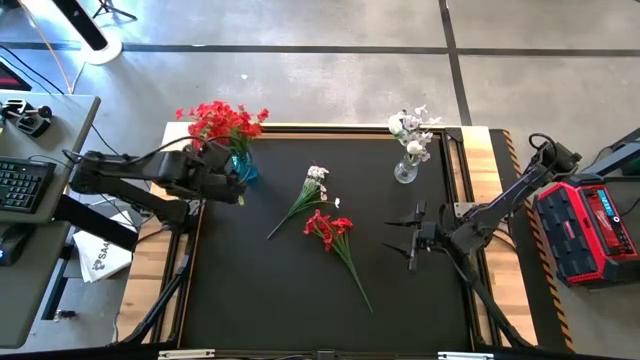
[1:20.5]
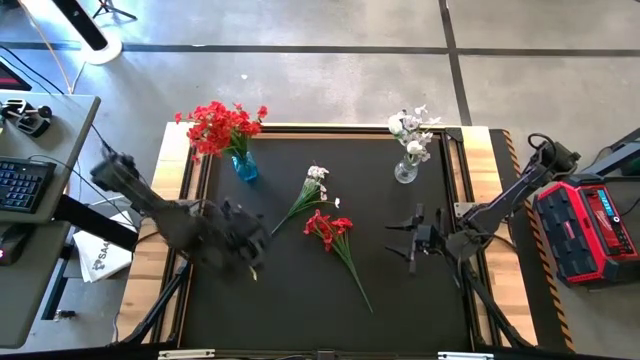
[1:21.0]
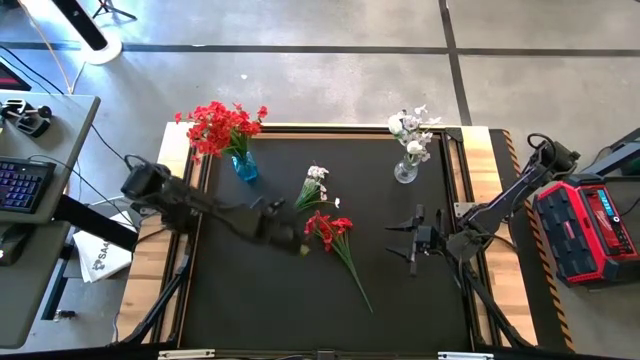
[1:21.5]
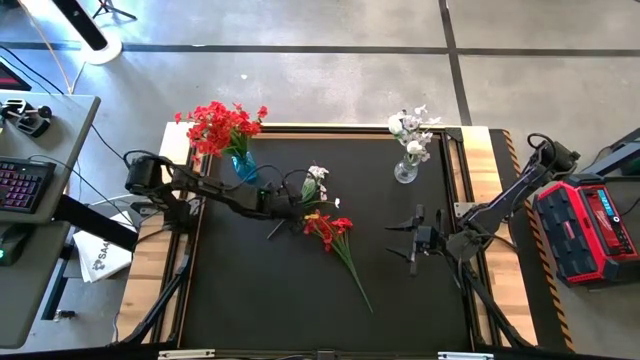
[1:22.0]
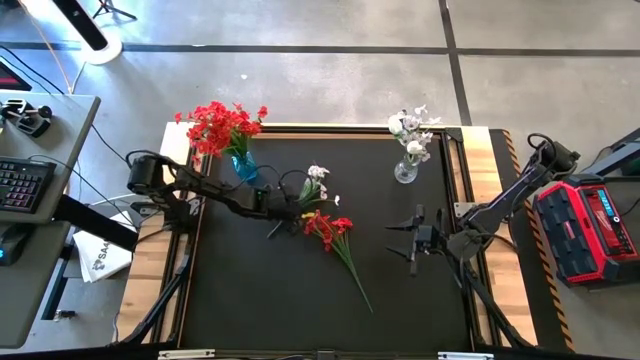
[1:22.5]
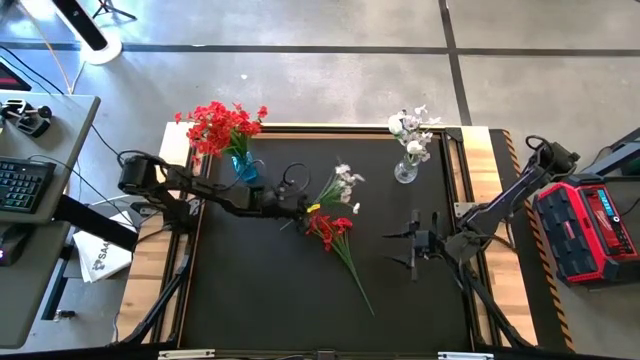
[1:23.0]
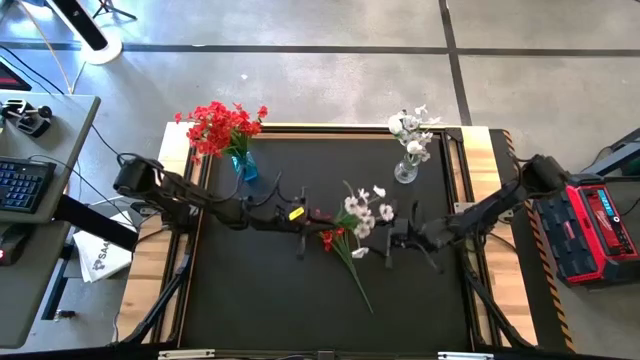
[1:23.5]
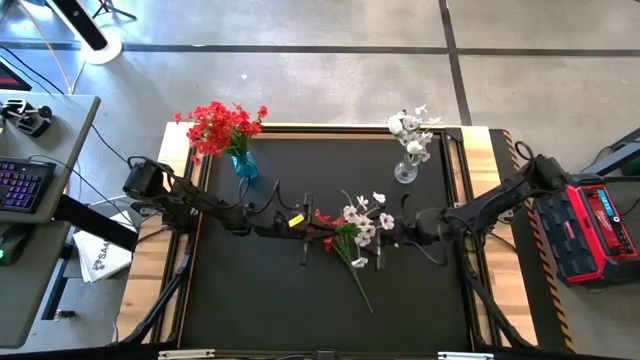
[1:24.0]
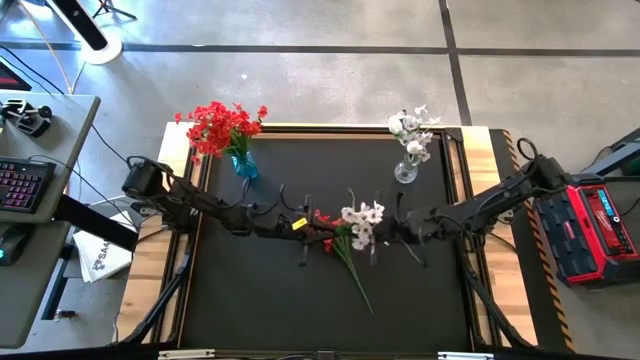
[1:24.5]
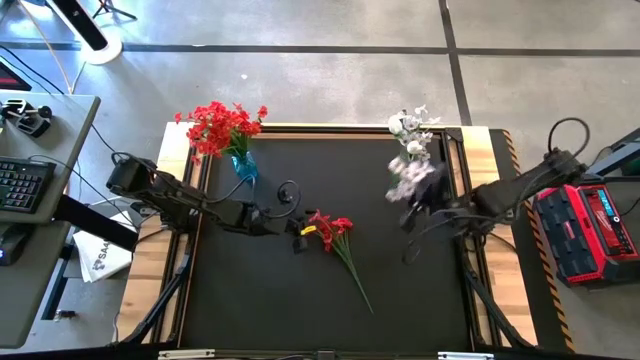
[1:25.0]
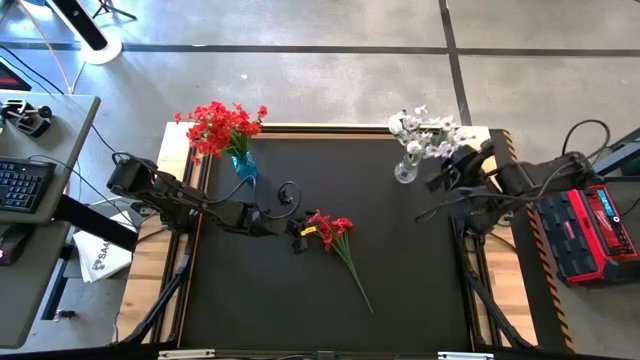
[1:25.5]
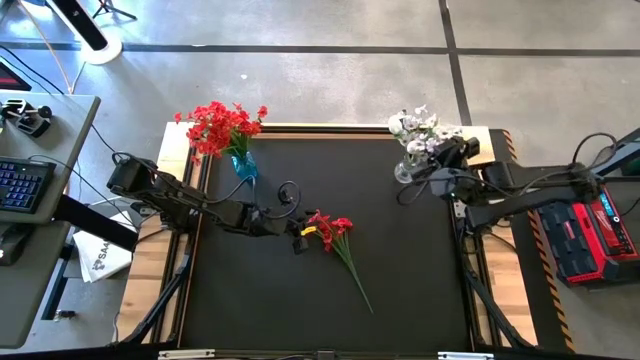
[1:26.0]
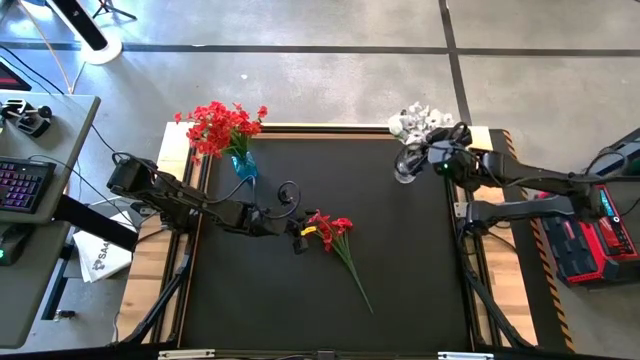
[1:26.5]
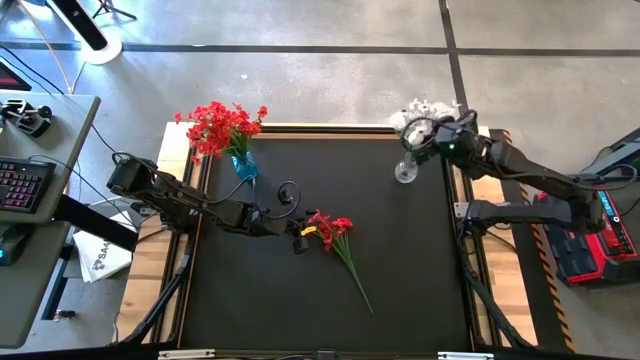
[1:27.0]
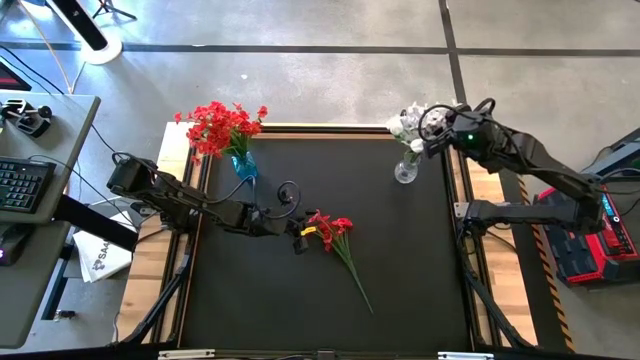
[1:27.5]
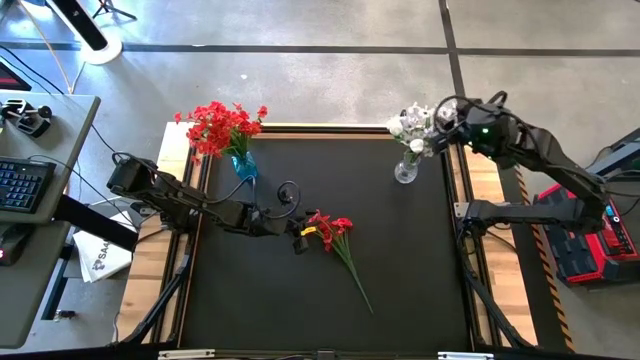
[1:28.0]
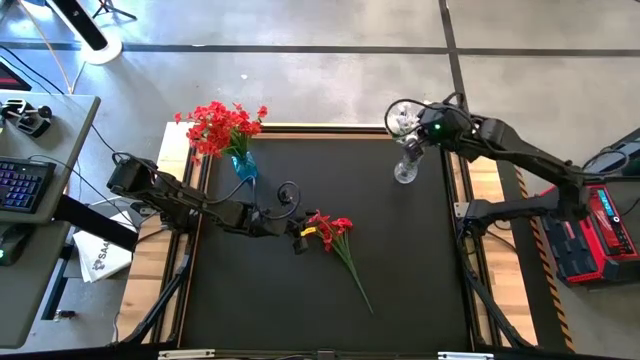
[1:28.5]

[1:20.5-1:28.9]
Task: Sort flowers into vase by color
Put the white flowers into the transparent vase

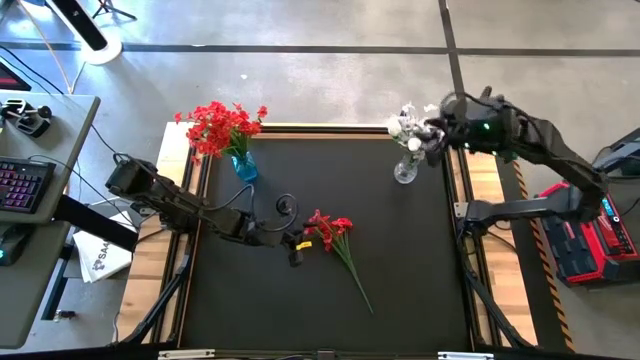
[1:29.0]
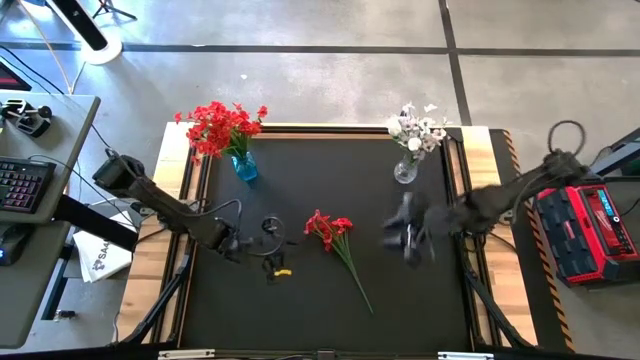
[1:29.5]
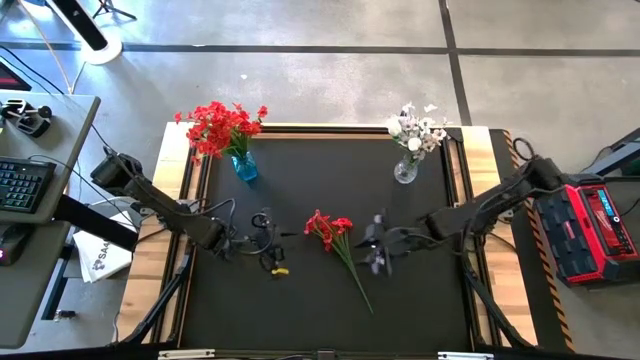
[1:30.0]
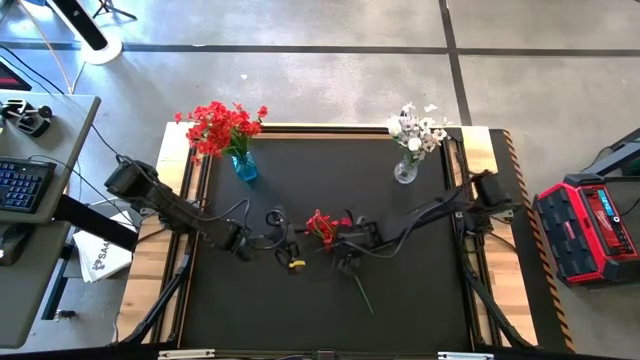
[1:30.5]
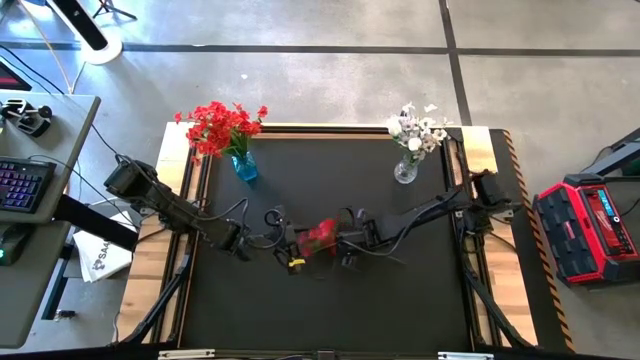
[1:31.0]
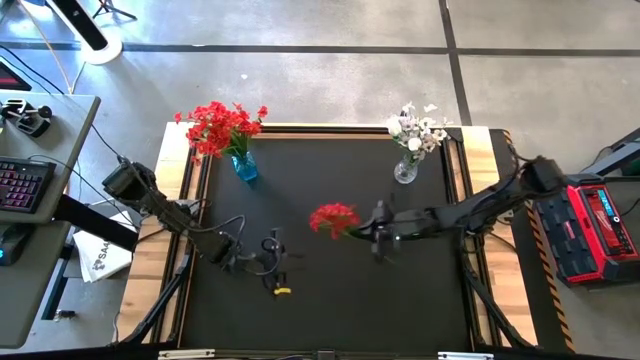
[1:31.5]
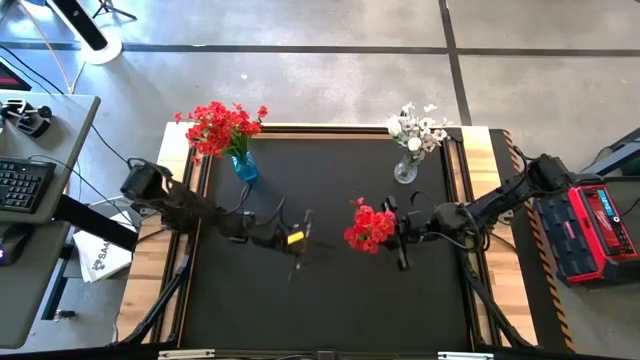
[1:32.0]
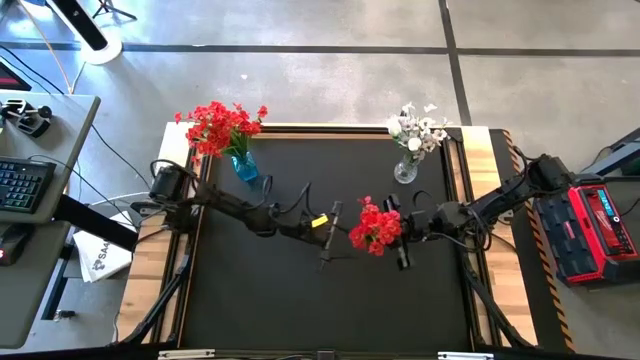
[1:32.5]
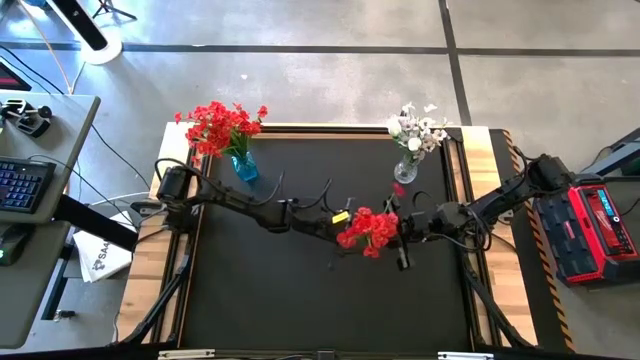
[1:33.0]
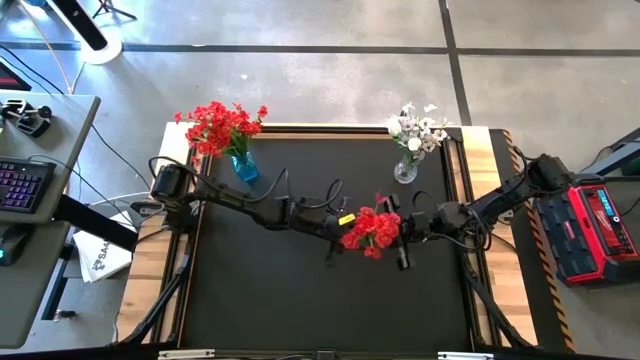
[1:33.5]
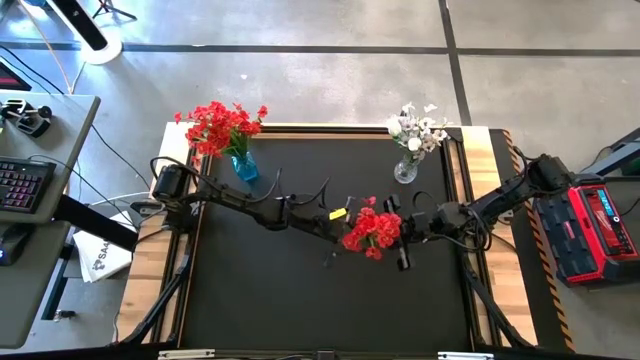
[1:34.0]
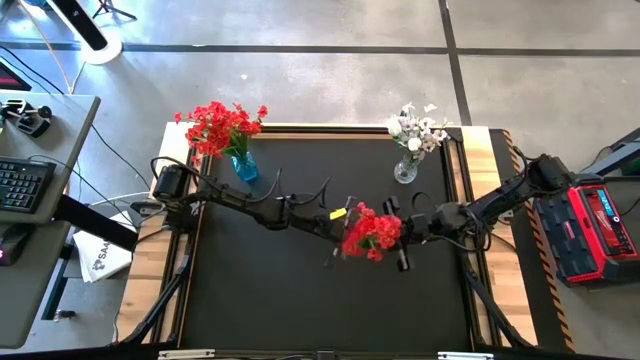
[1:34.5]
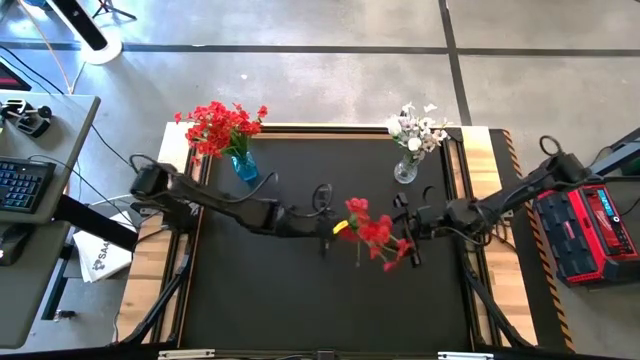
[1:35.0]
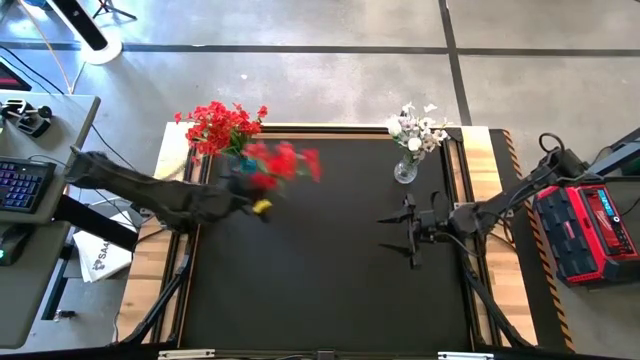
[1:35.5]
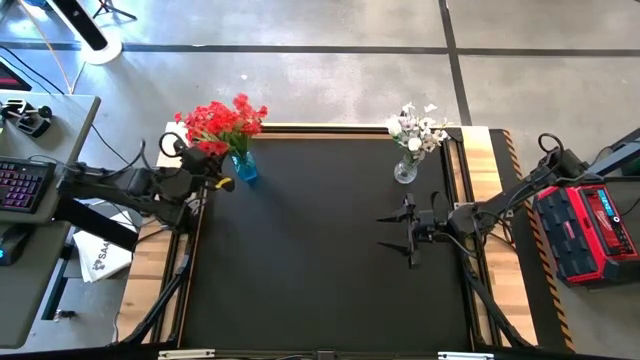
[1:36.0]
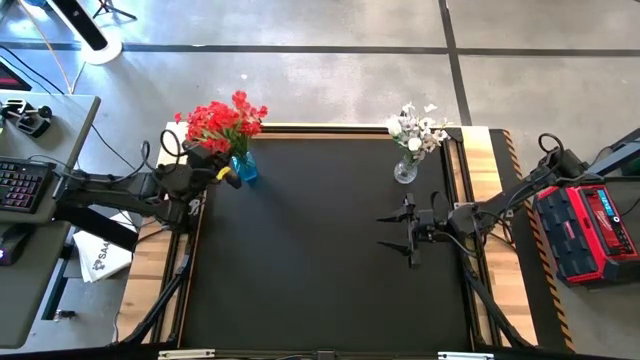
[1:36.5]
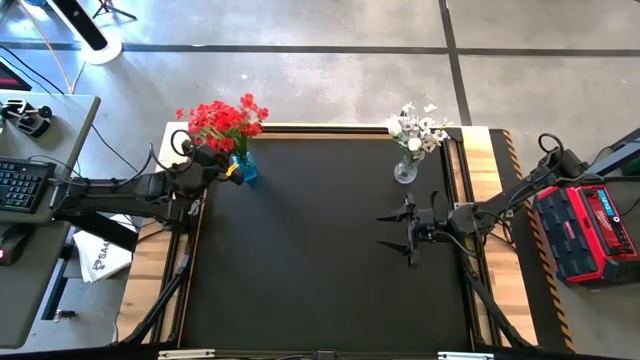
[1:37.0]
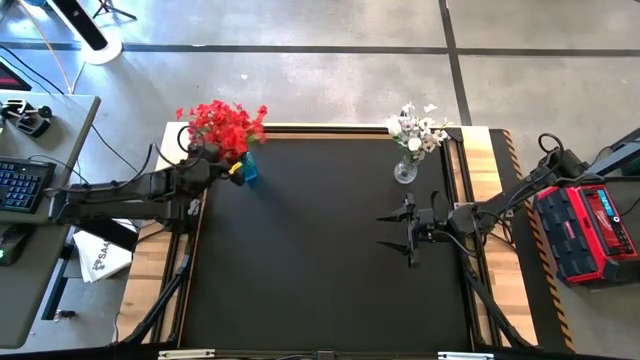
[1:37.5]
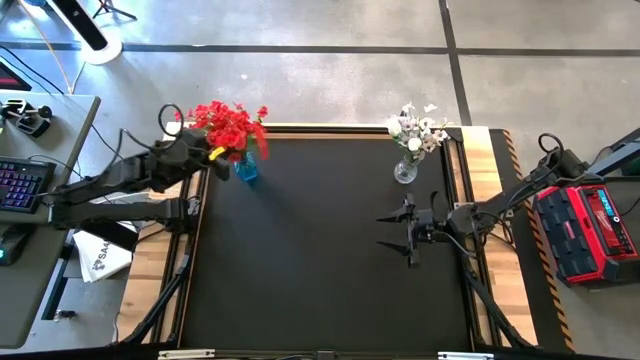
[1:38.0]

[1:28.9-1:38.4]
Put the red flowers into the blue vase

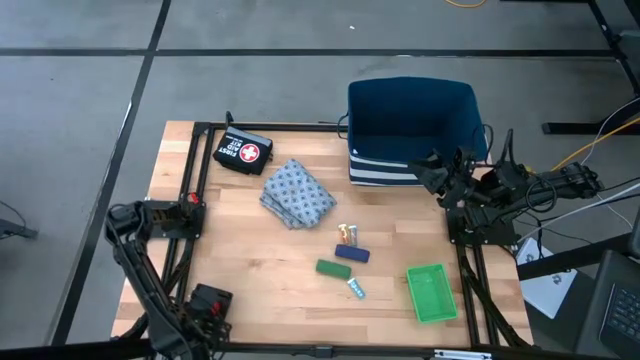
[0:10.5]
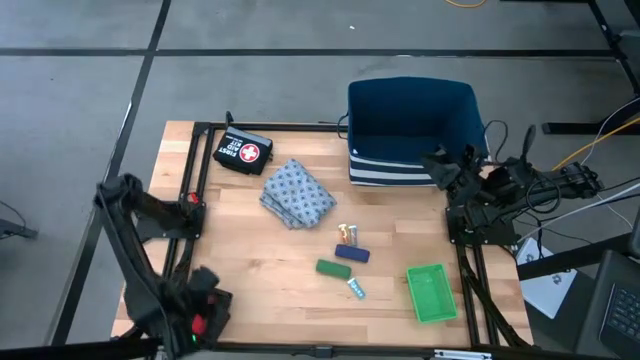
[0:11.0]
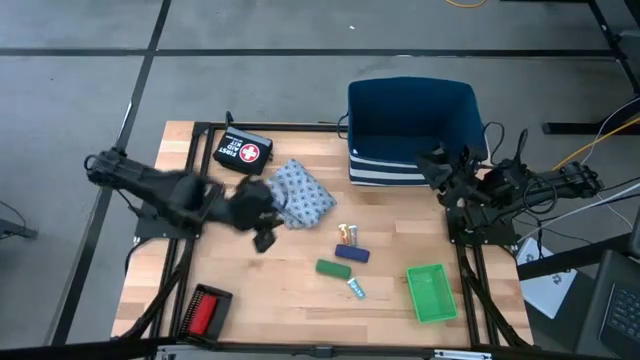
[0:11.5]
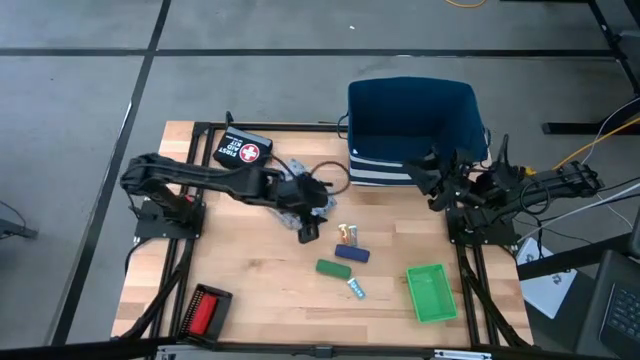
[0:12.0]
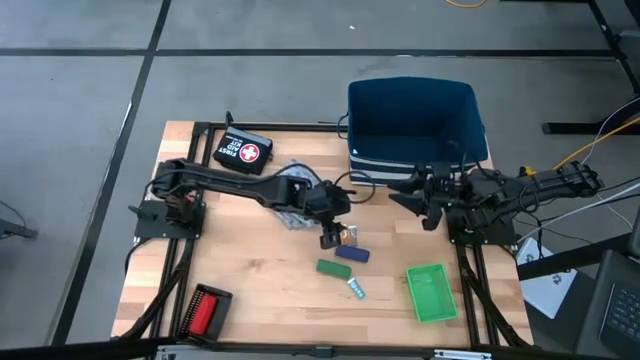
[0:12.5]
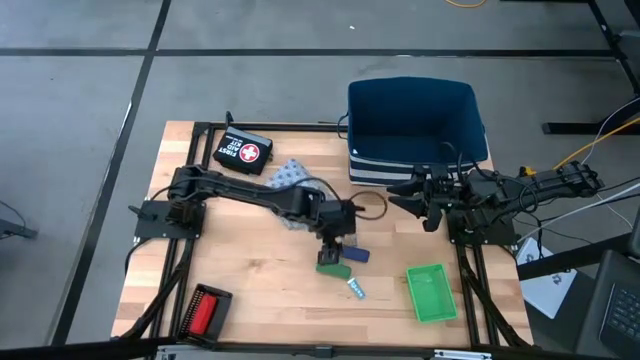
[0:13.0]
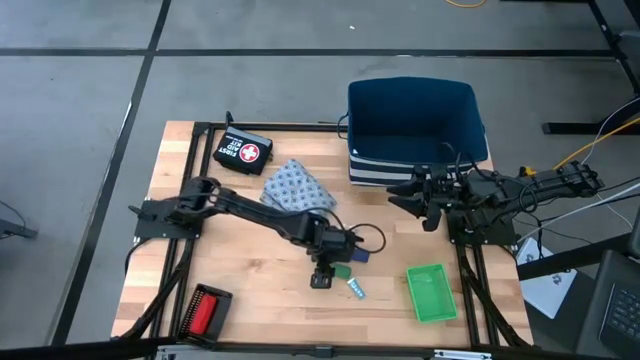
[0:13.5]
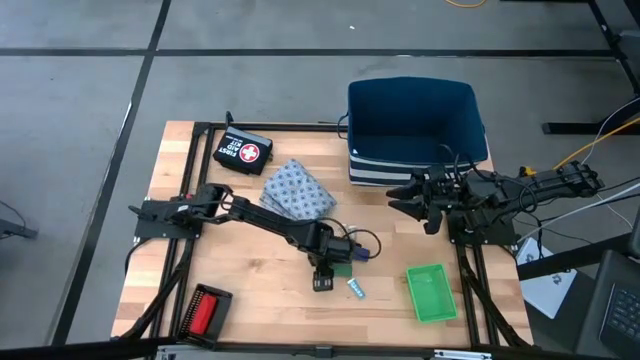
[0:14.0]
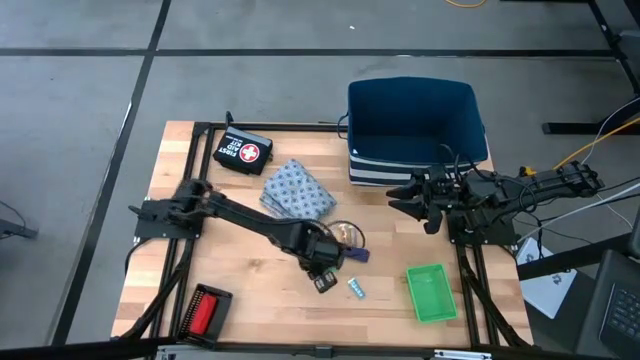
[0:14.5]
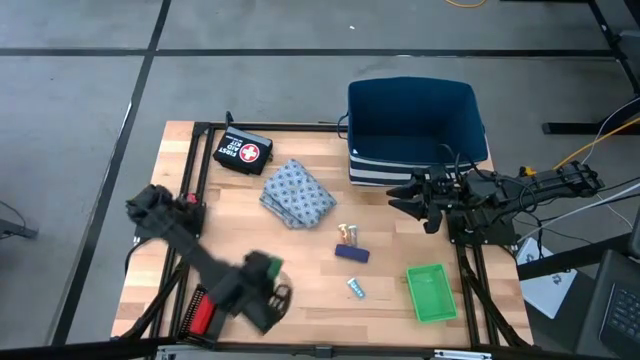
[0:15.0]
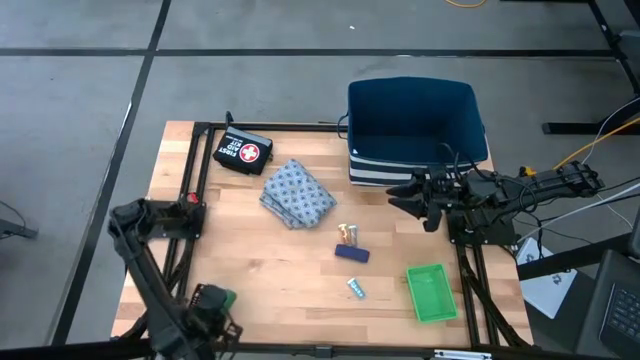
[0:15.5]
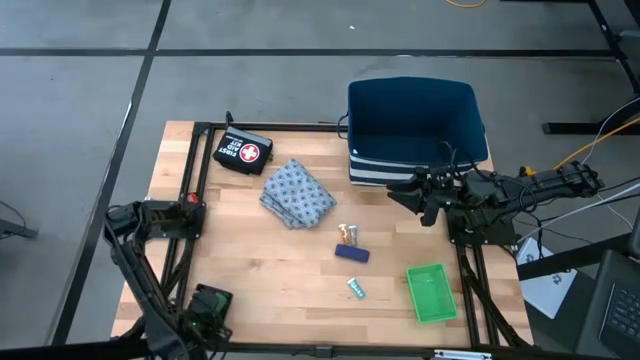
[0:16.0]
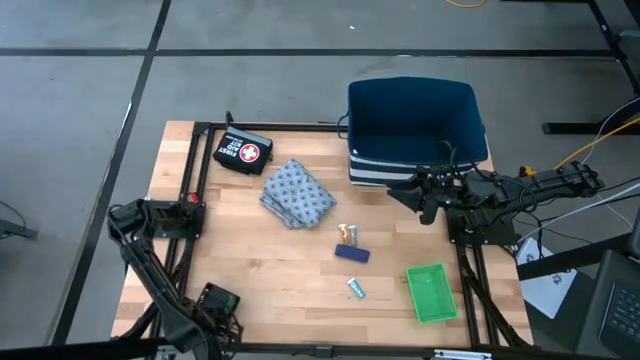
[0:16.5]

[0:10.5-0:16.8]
Task: Pick & place medical supplies in basket/bin
Put the green bandage into the black bin
